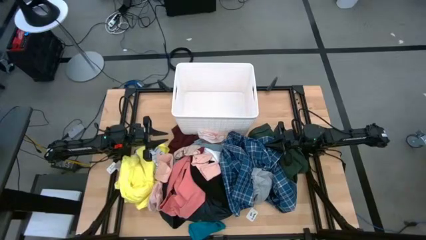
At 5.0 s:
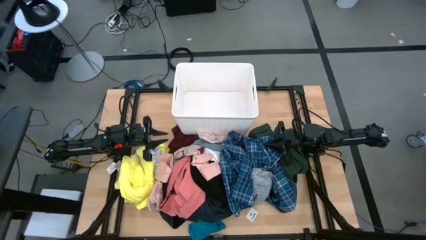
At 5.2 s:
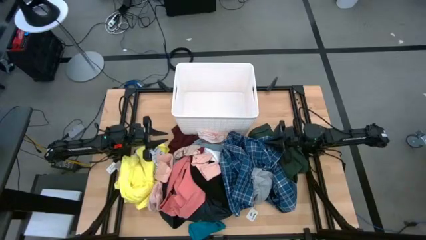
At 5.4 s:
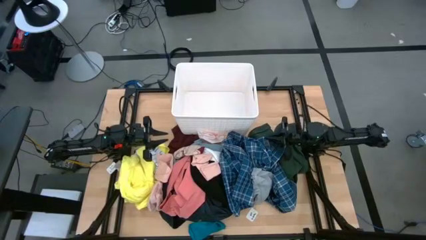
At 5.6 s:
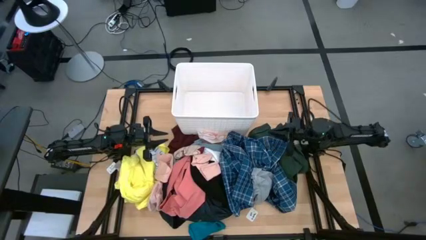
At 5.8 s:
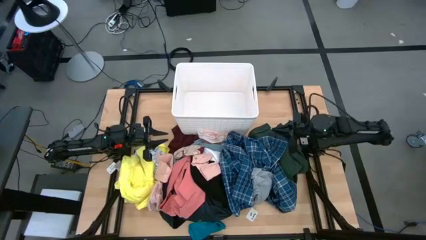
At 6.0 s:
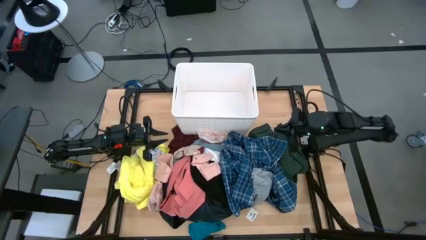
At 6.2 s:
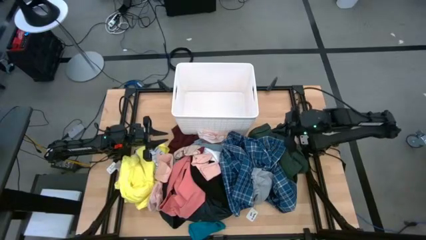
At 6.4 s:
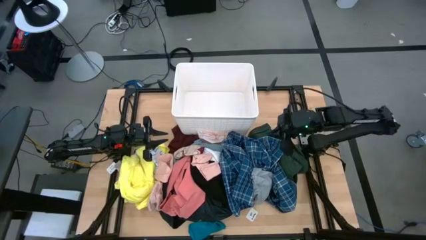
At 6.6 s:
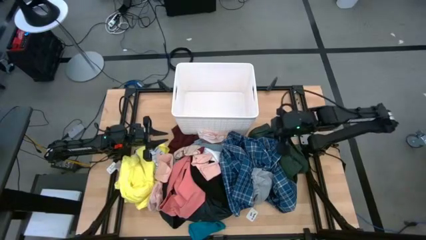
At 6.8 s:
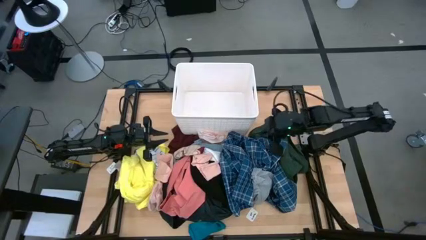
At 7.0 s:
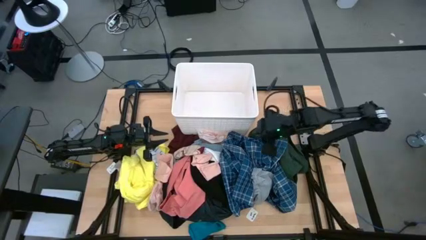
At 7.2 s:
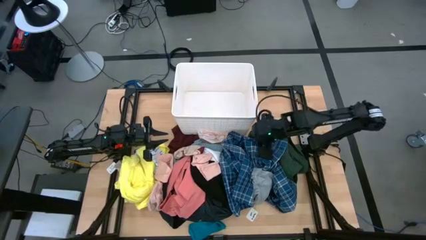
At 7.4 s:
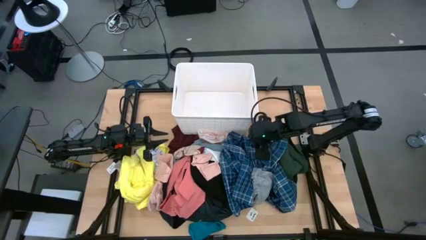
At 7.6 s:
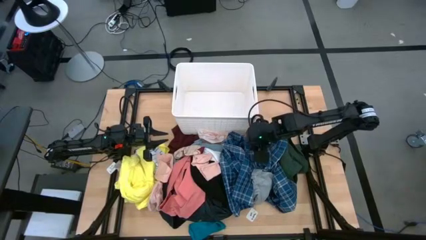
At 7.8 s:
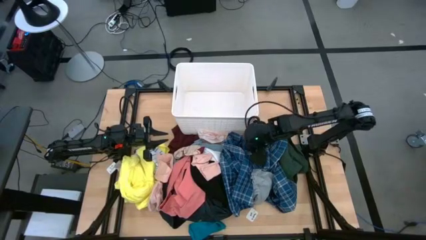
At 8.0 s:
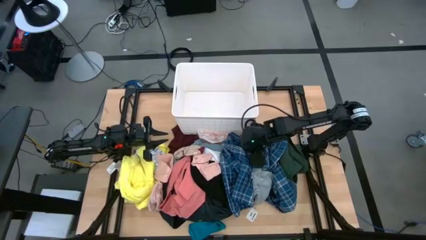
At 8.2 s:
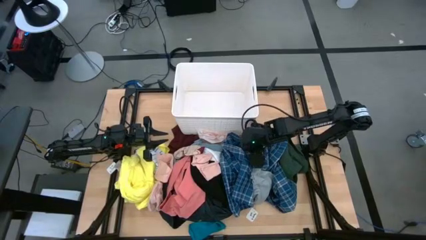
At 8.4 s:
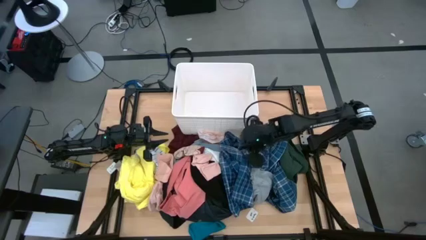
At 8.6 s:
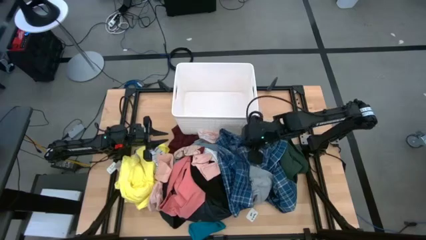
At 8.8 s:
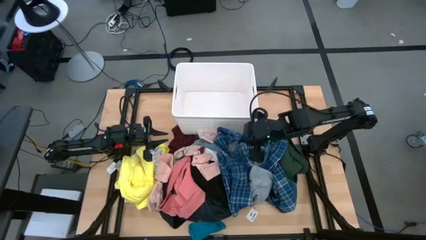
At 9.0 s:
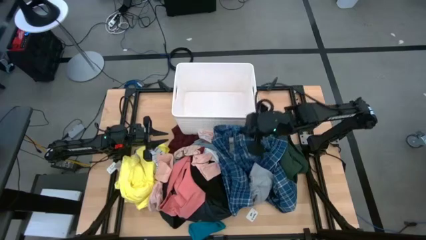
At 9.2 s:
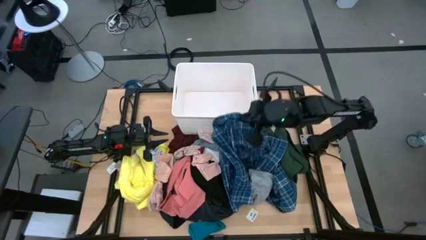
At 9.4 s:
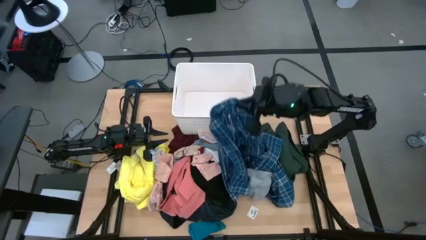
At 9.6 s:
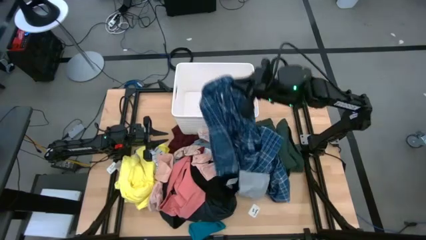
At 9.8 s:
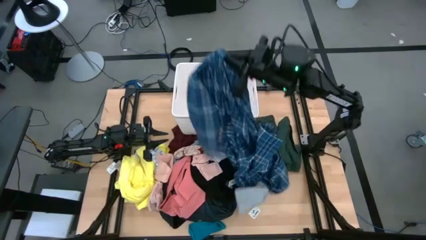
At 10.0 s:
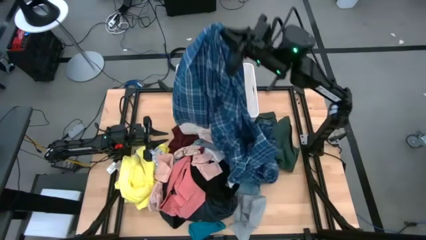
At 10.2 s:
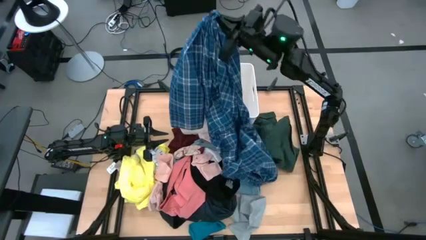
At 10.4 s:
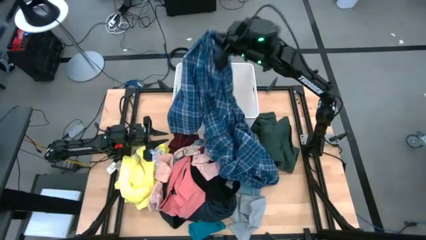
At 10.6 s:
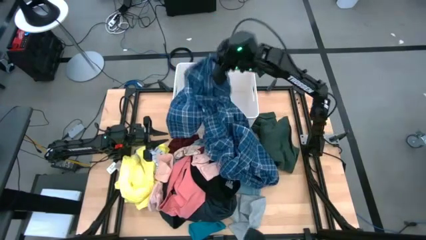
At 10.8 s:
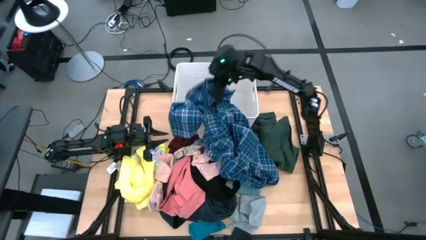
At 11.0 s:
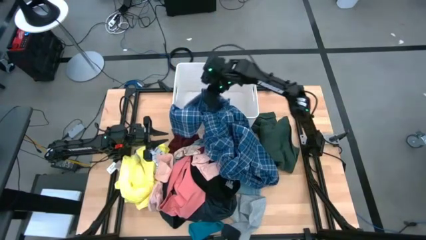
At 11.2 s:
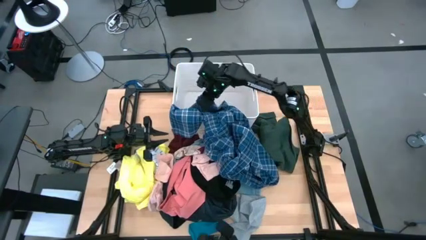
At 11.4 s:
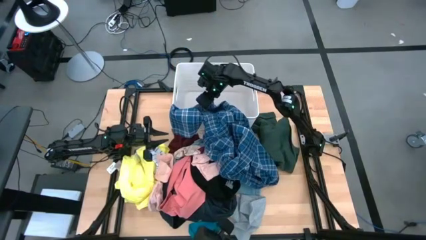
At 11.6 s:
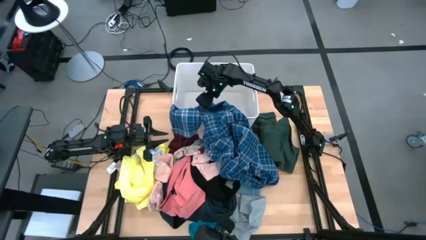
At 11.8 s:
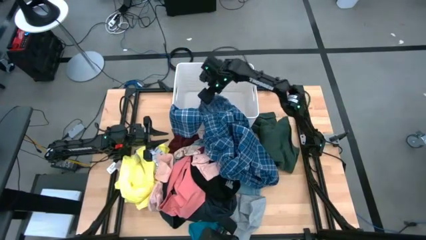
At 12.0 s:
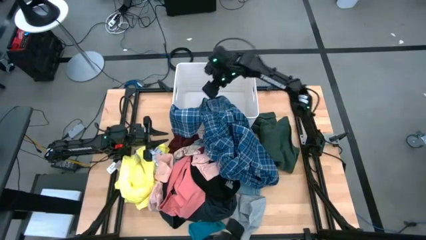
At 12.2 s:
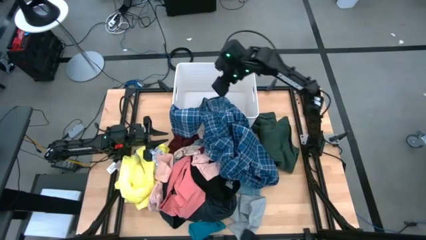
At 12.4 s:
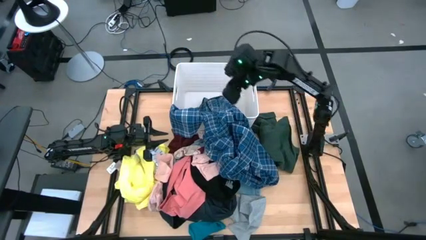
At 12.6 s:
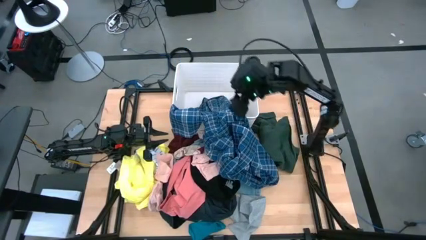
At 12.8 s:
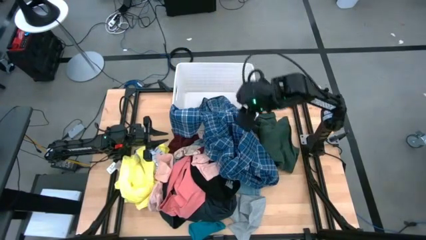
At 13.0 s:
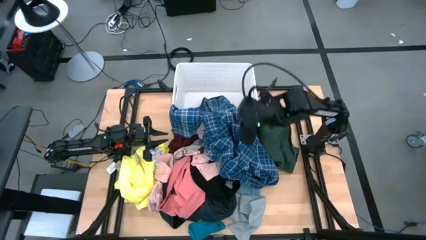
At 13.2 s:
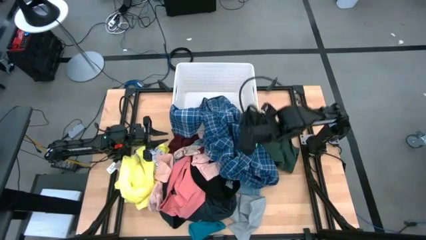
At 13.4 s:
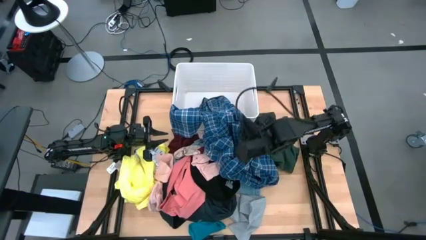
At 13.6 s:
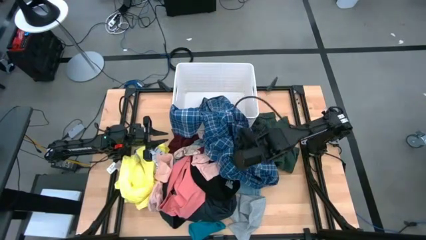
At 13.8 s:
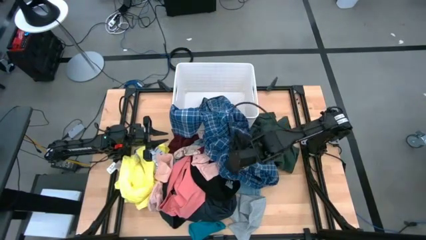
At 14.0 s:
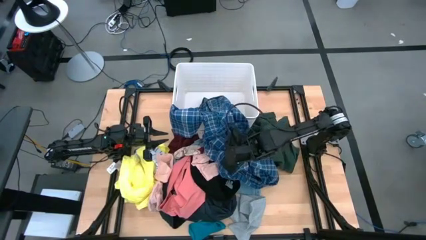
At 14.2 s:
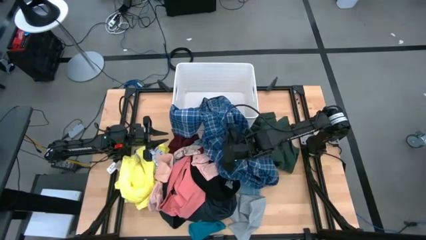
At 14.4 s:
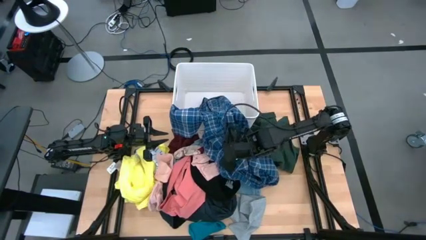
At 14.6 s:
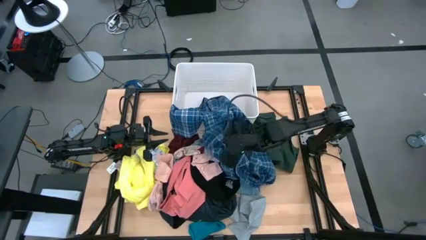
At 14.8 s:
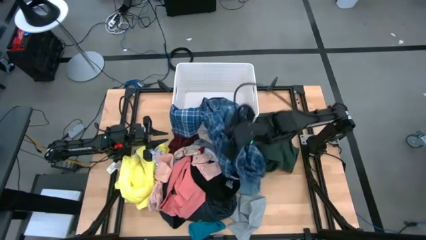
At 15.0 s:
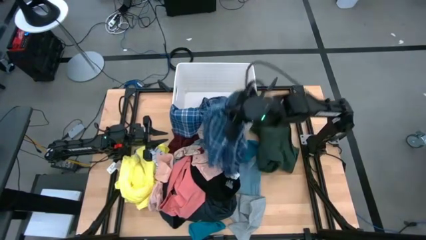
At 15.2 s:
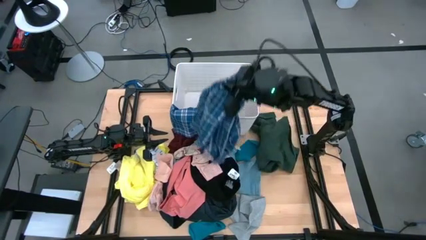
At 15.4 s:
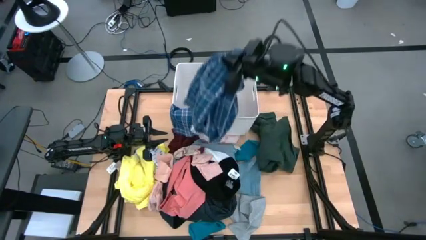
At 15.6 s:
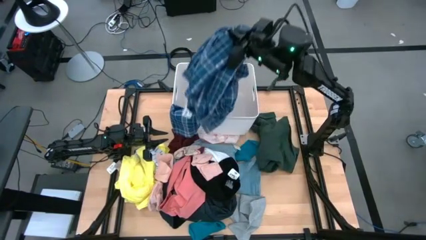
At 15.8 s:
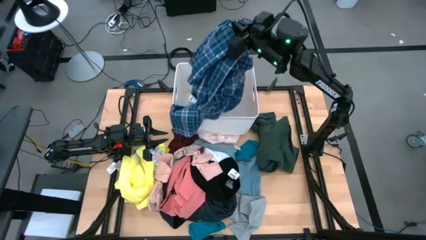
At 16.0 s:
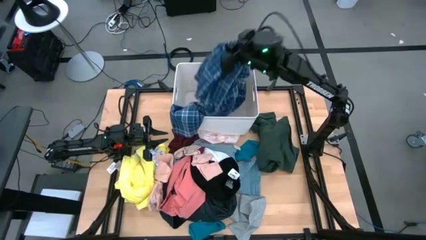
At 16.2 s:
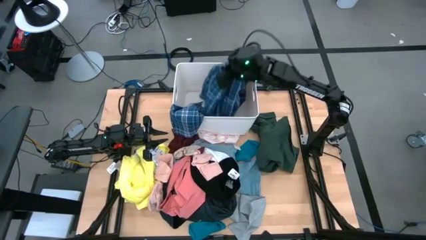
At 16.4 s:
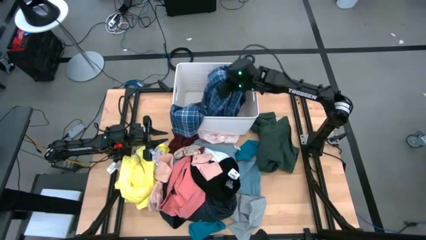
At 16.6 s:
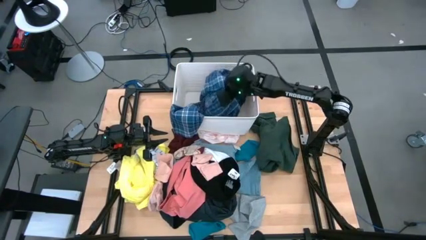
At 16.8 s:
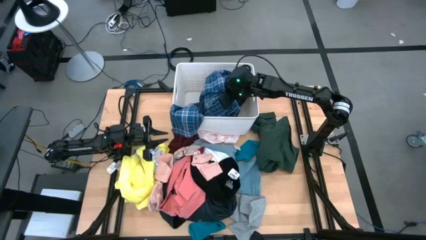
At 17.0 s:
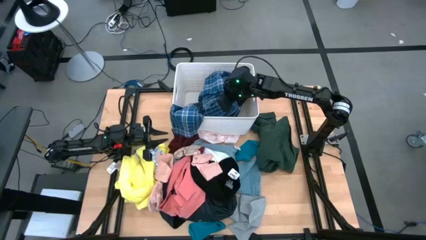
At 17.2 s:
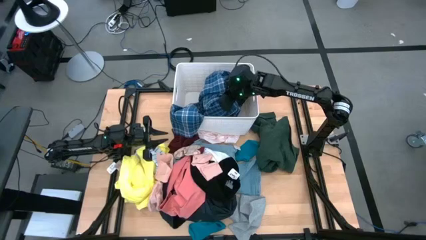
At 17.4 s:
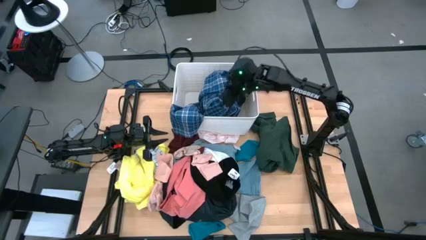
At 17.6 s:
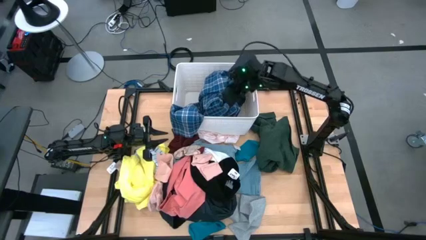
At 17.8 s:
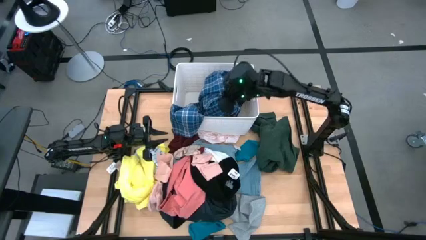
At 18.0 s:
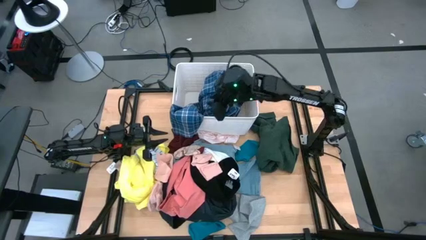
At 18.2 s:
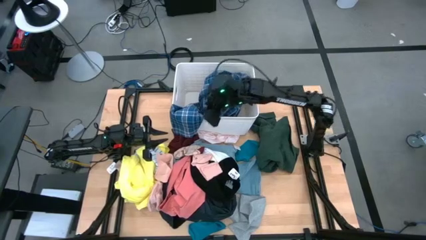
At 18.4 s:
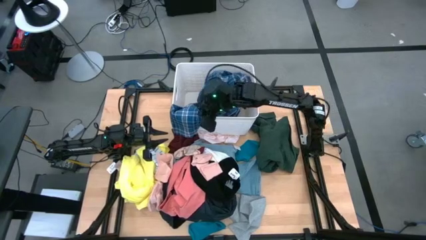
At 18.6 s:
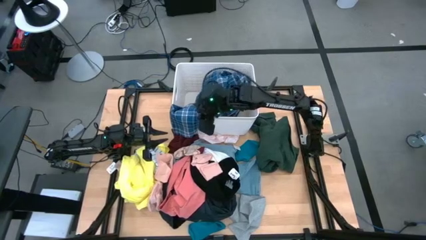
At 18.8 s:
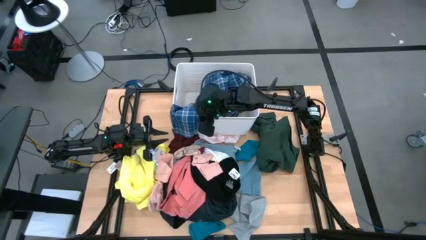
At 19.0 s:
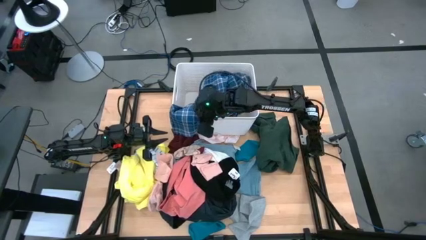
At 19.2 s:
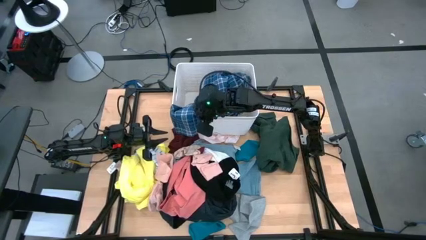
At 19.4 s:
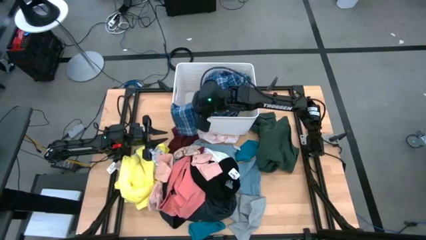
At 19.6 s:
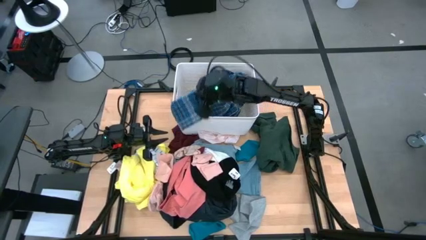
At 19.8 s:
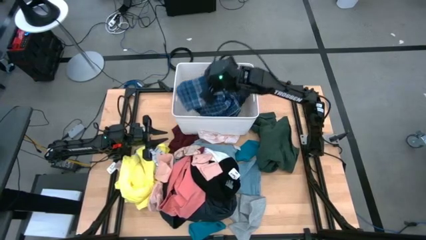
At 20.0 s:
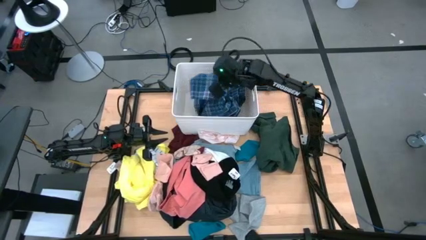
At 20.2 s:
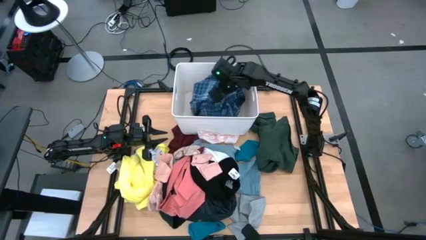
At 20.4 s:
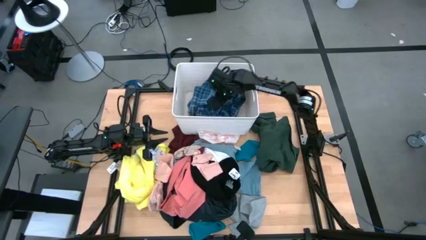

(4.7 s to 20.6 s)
Task: Sort clothes
Put the blue pajamas into the white laundry bin
